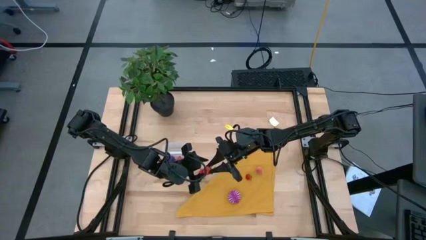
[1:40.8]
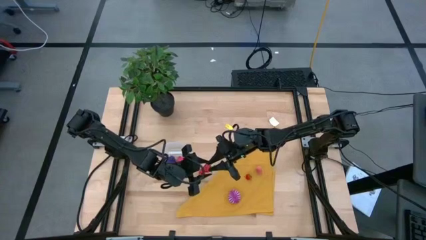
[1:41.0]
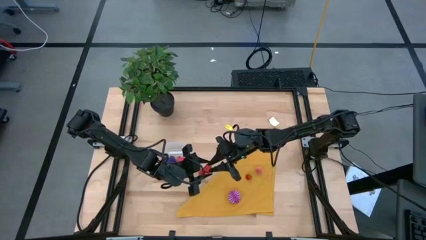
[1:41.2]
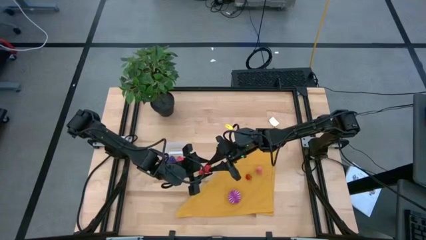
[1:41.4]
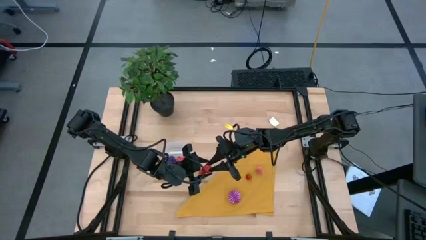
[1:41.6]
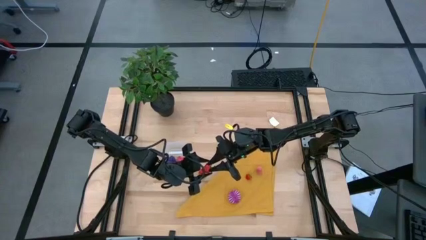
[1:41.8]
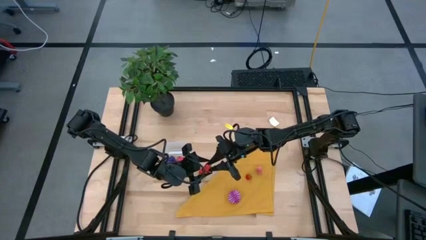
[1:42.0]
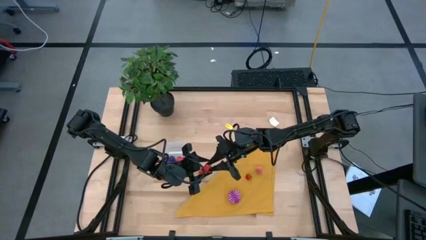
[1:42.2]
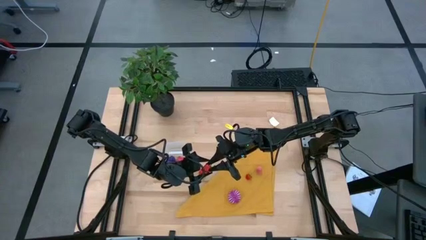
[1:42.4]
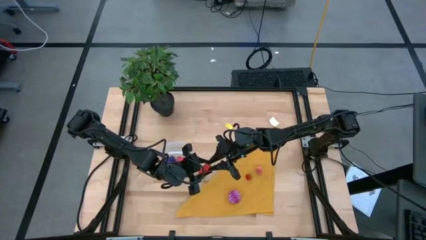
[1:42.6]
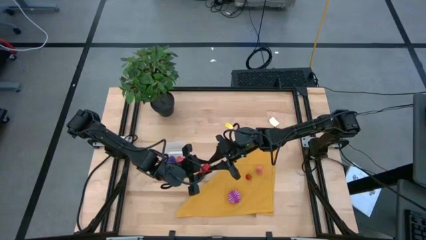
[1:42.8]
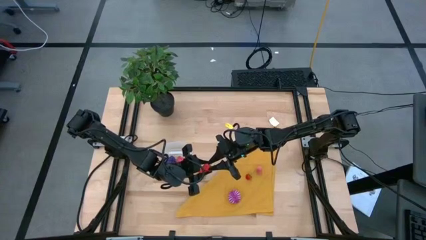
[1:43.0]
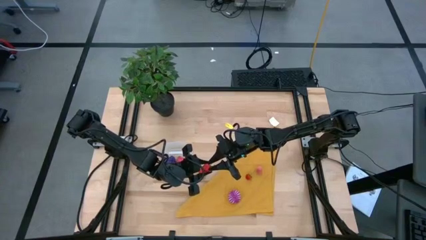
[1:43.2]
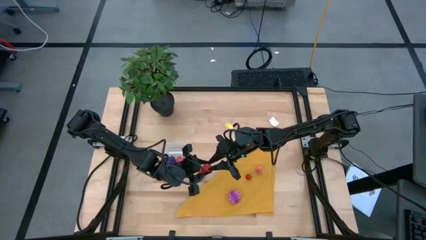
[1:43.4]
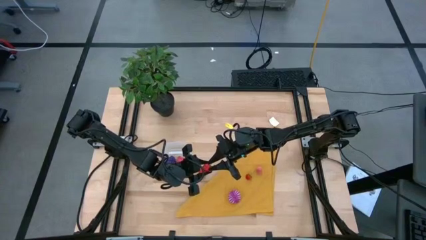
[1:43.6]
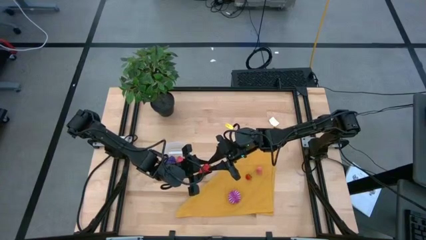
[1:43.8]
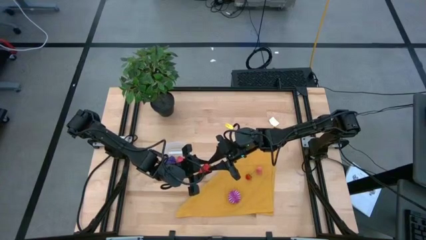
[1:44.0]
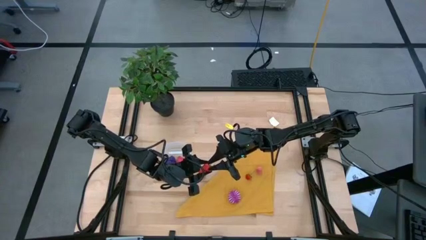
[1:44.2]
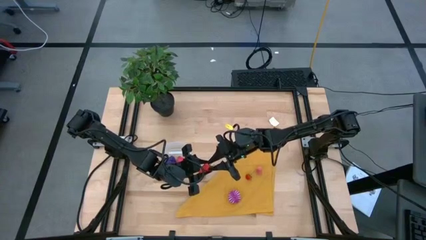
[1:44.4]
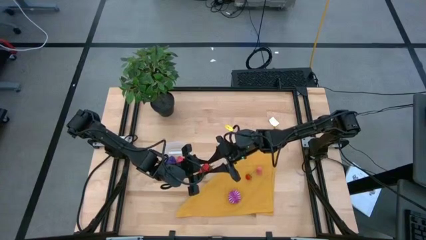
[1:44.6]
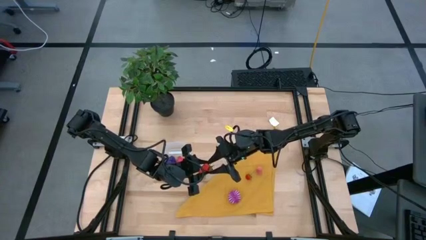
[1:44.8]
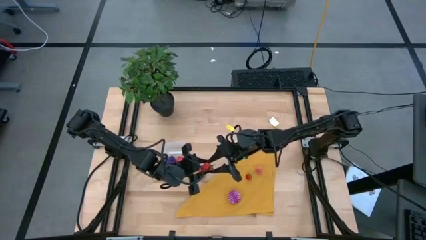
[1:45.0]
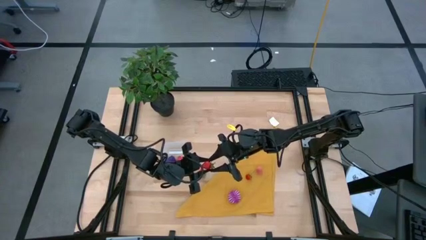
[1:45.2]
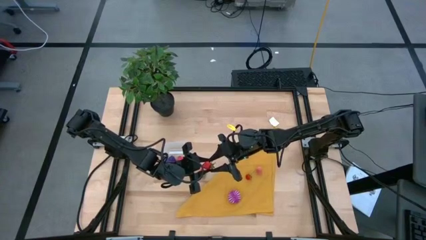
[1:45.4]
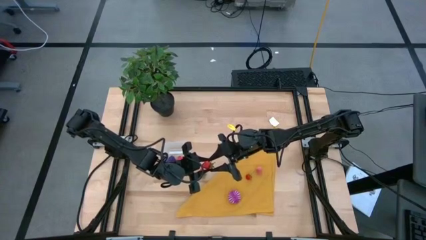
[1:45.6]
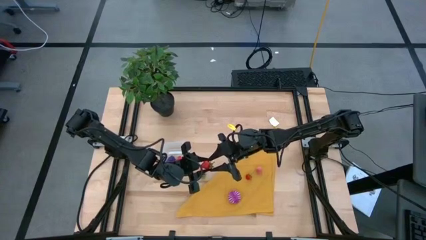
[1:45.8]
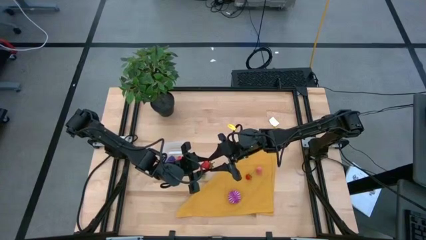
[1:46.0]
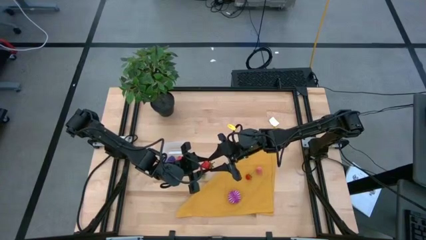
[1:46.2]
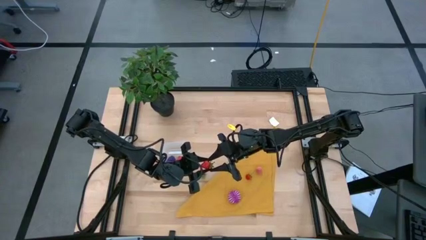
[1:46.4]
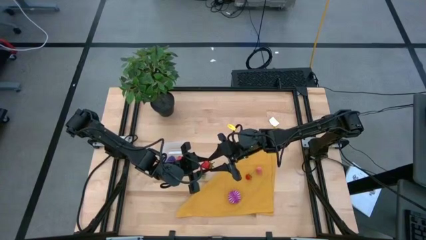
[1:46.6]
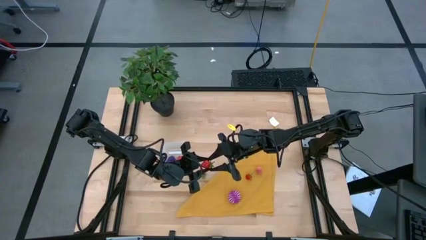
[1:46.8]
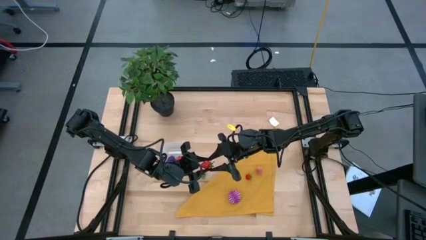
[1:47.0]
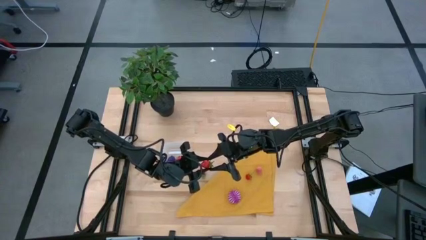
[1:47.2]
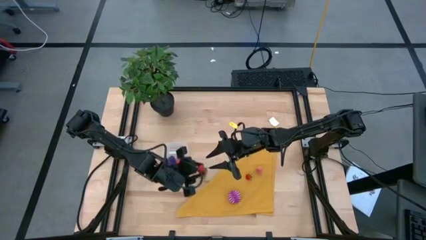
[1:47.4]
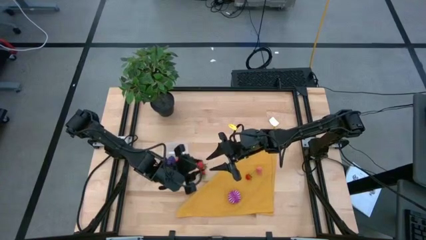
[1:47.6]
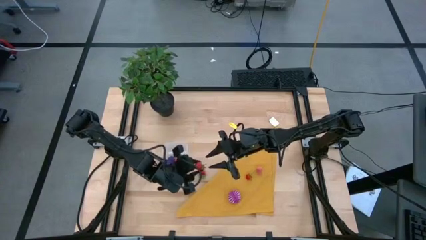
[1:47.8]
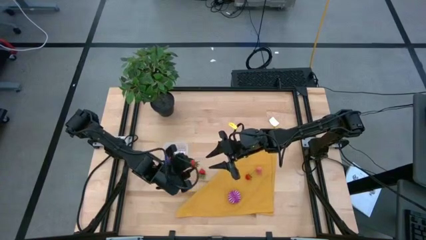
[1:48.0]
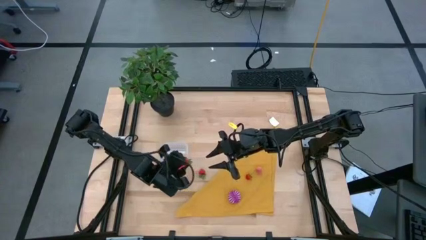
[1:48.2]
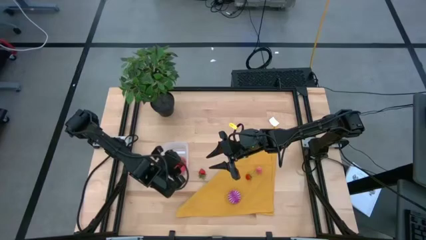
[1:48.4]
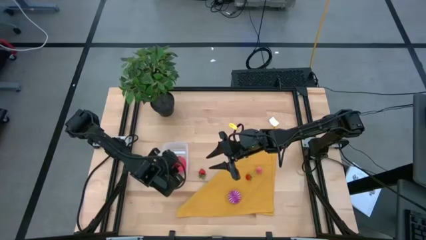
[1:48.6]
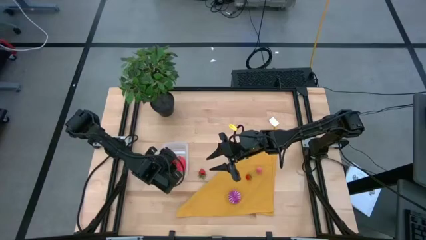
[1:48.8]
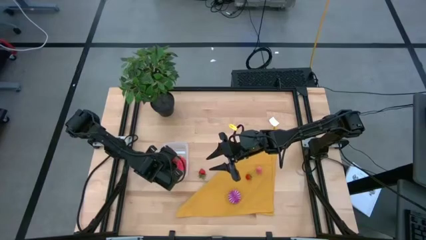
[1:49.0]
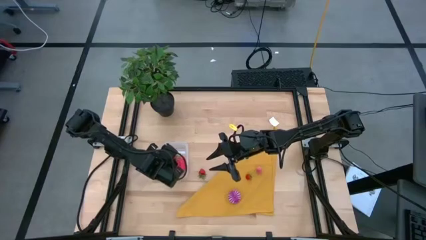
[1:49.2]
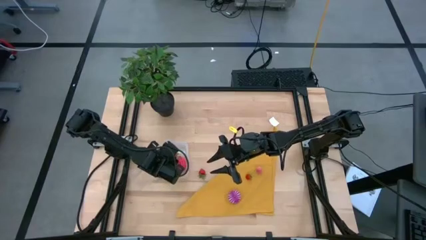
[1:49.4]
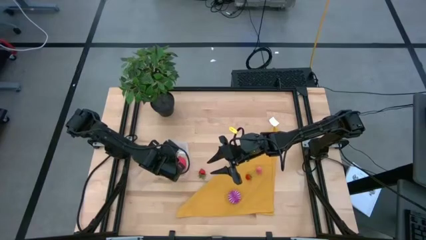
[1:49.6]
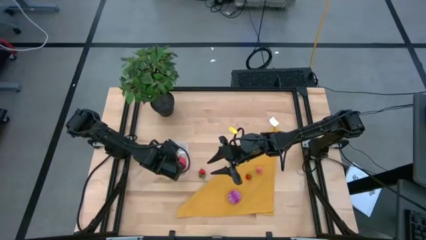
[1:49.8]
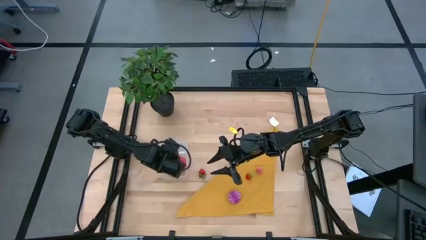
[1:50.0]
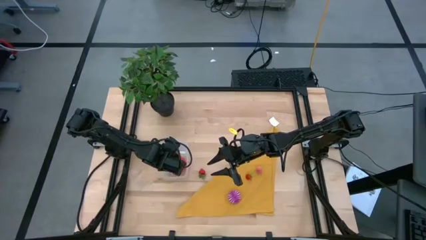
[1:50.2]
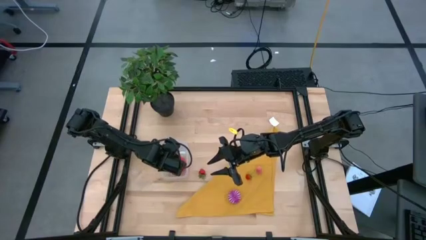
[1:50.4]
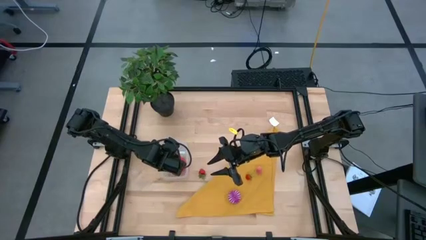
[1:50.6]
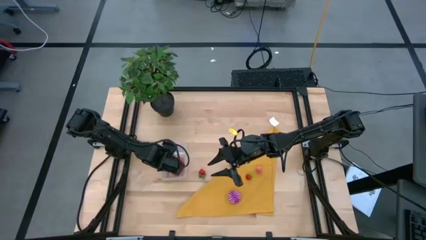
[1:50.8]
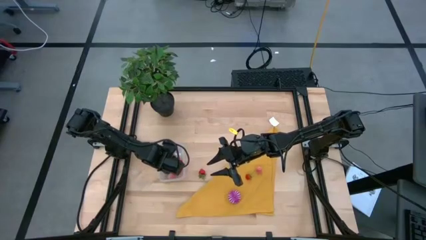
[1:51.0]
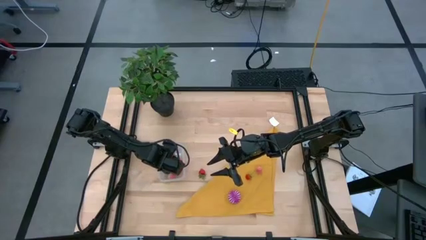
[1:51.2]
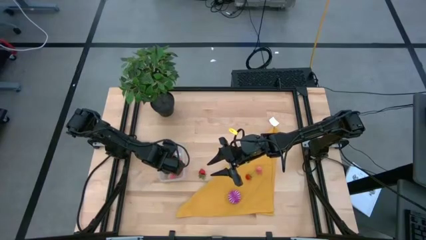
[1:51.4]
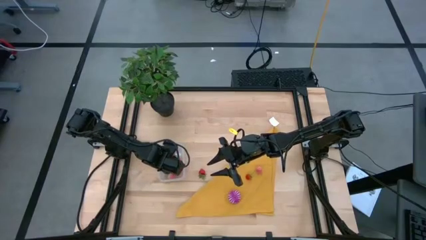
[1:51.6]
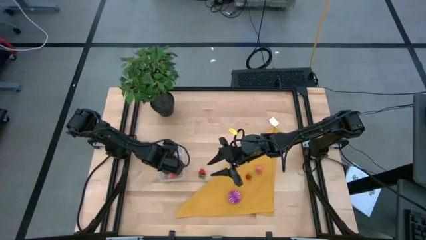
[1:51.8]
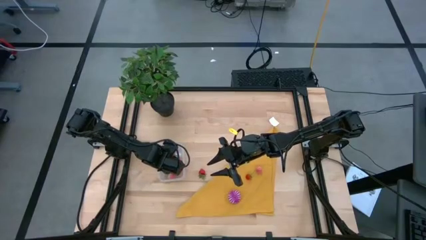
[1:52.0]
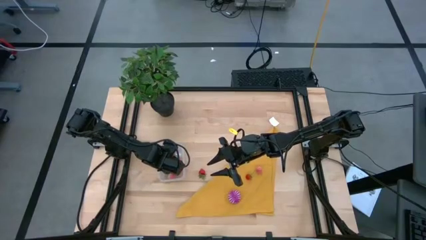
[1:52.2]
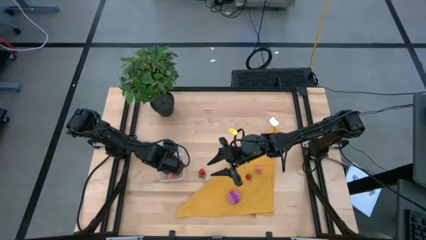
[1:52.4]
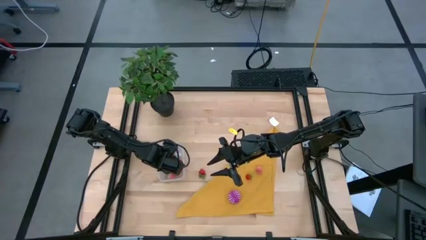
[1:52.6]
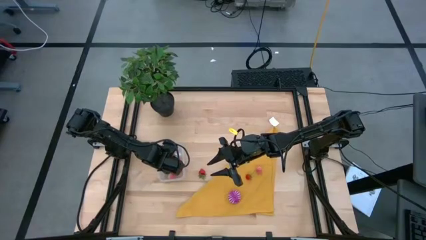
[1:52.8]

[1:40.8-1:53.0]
Task: Pick and placing Produce into tupperware
Put the top red strawberry into the transparent bin
